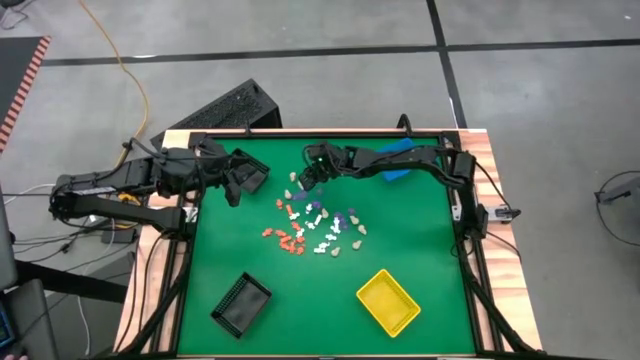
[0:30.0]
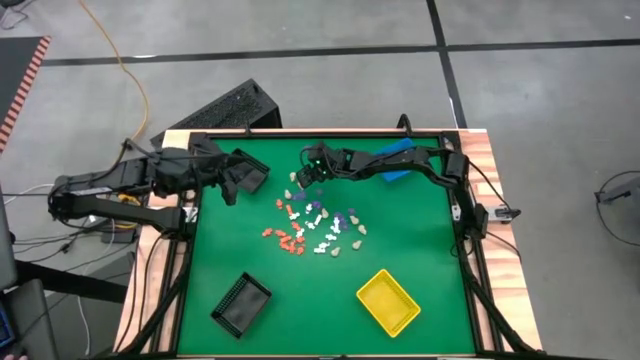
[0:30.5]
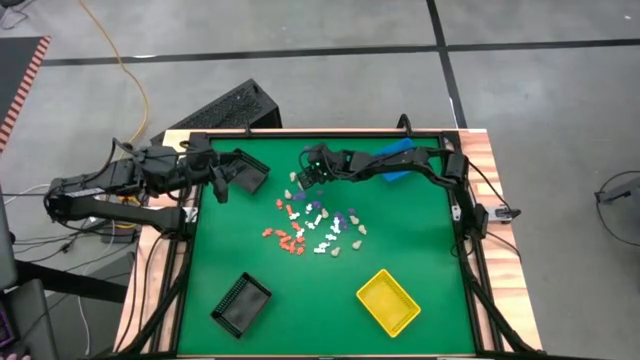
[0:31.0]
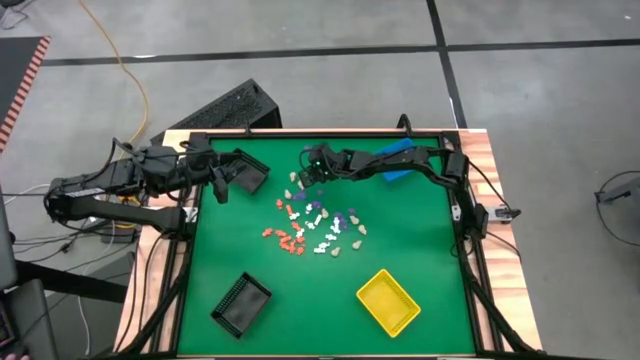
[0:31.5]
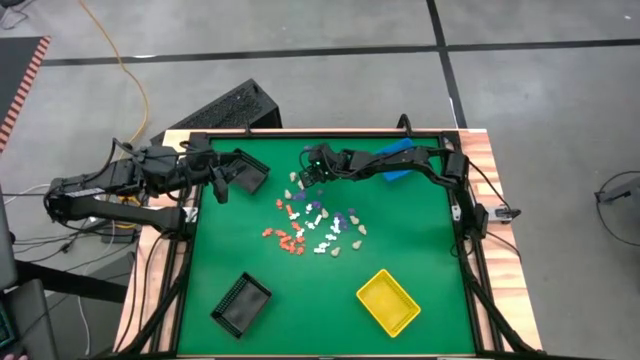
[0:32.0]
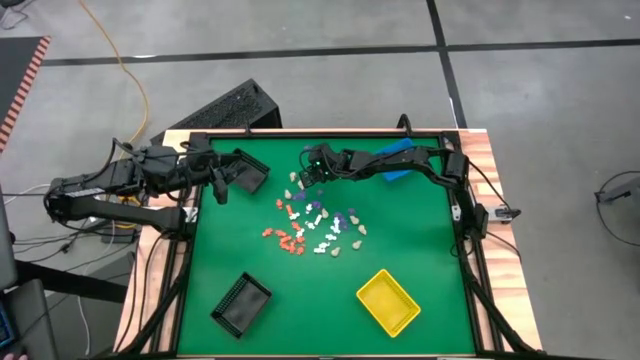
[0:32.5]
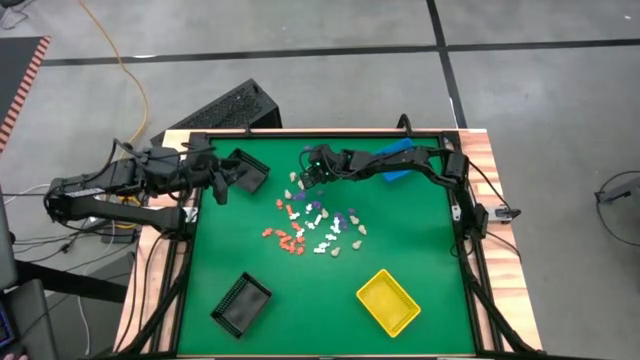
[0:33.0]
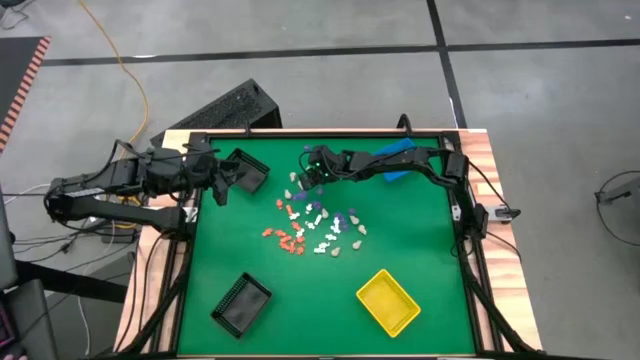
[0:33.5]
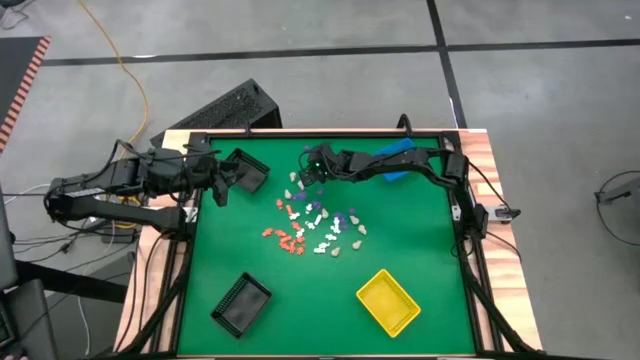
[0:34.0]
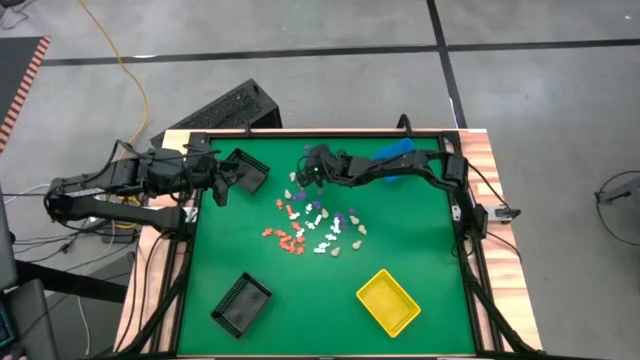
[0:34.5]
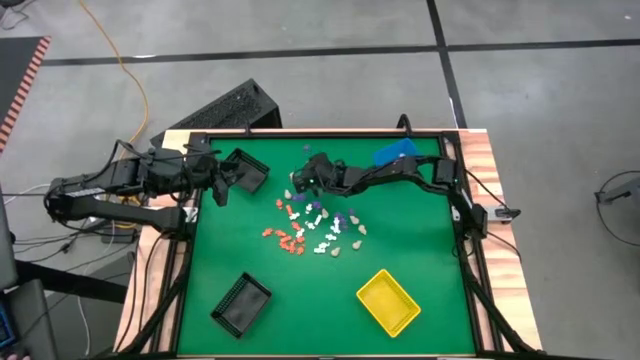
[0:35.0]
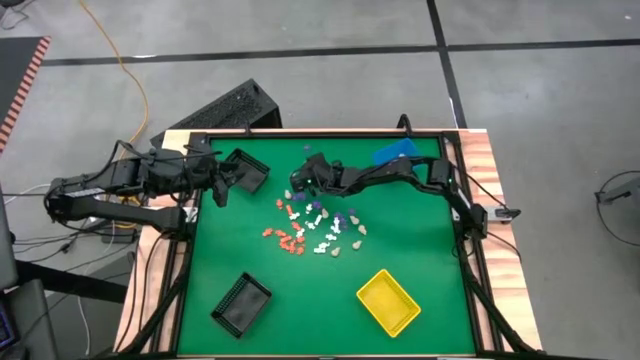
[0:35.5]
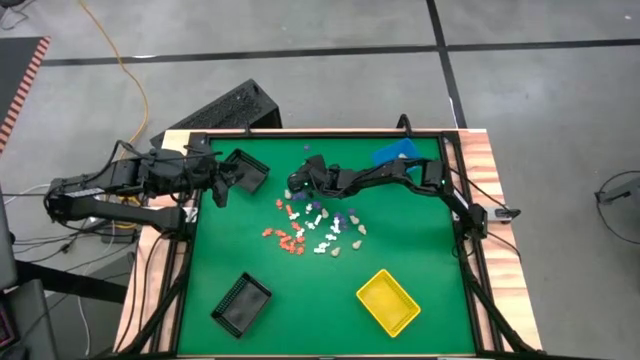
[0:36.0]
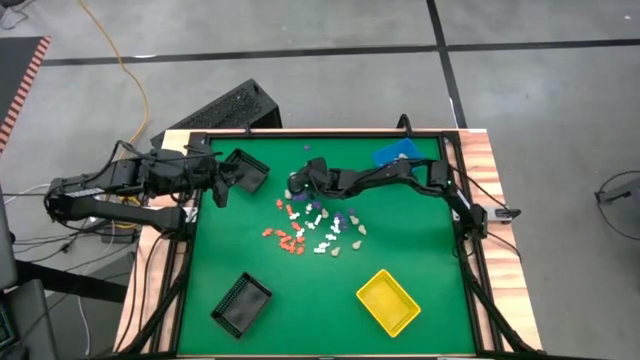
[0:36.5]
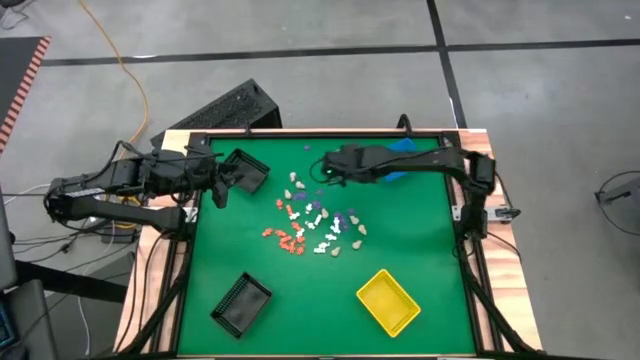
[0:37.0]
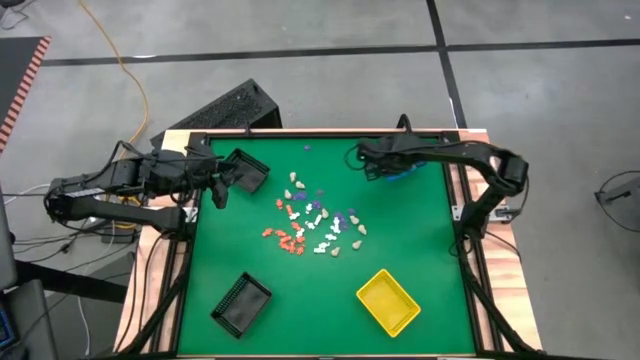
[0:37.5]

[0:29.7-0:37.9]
Task: Sort Halloween decoration
Put the skull toy into the blue basket

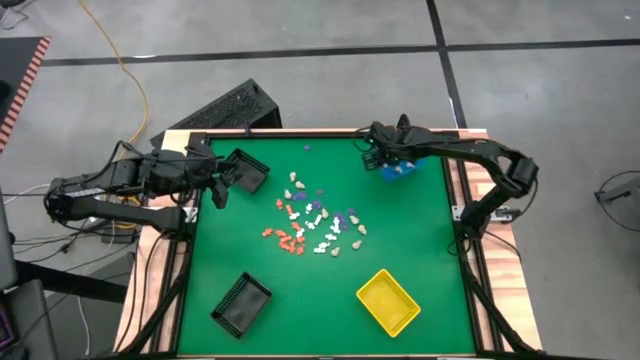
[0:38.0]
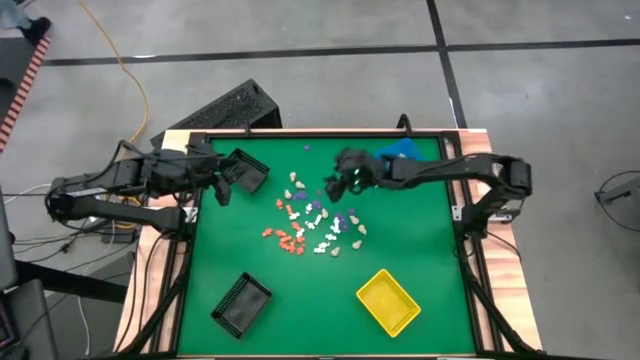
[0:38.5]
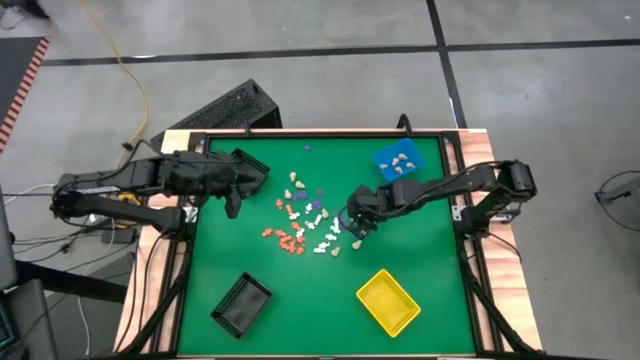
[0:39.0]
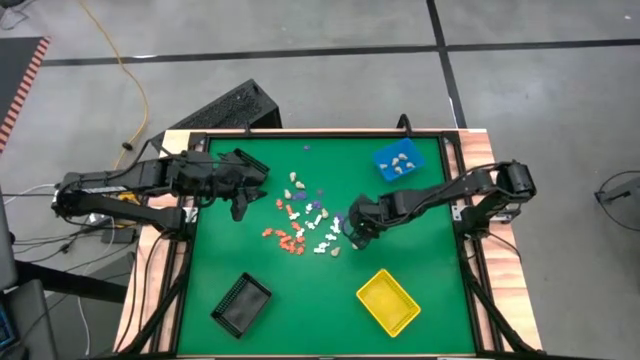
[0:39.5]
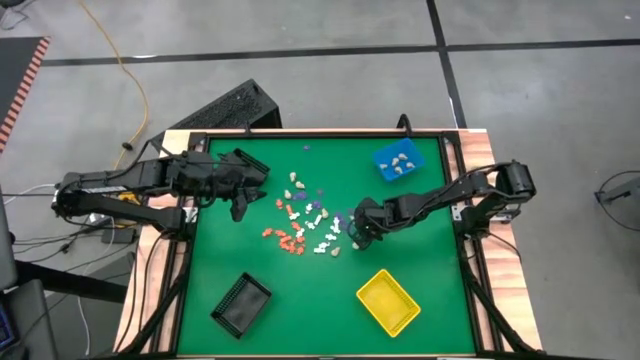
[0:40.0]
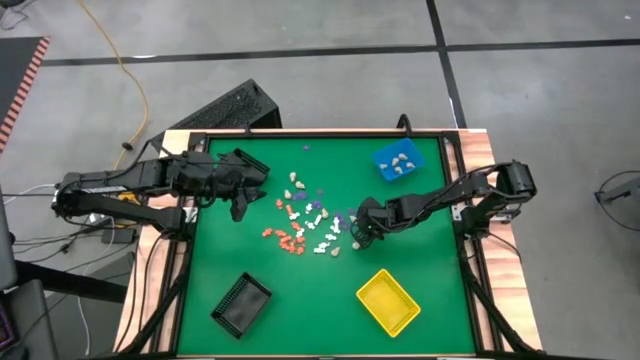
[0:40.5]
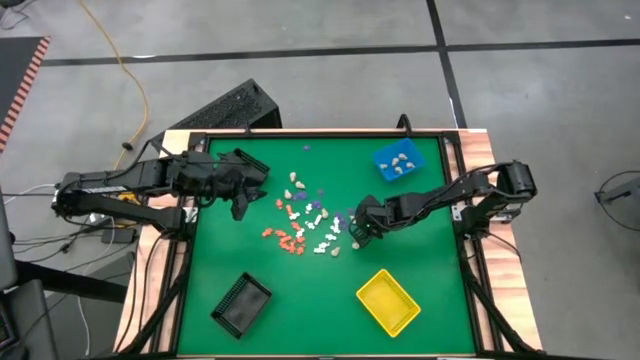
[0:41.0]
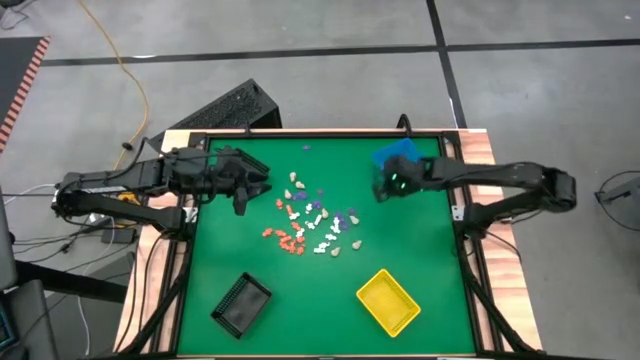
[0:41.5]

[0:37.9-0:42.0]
Put the skull toy into the blue basket

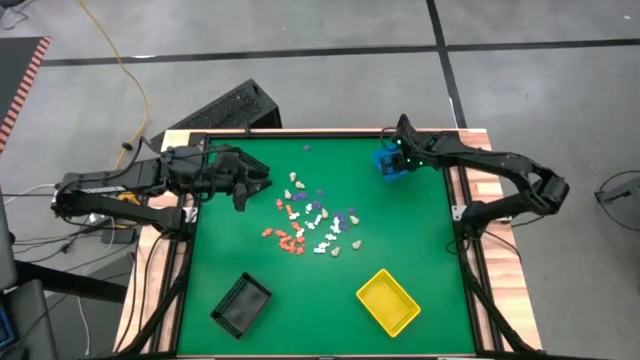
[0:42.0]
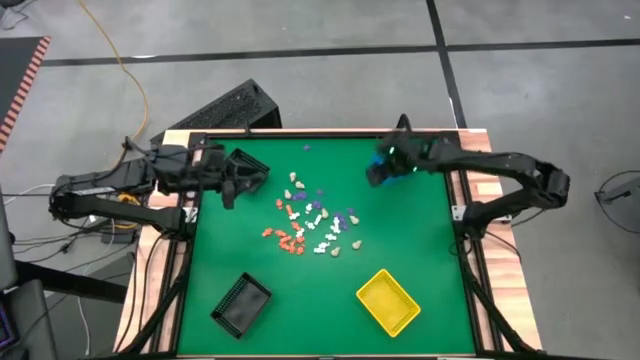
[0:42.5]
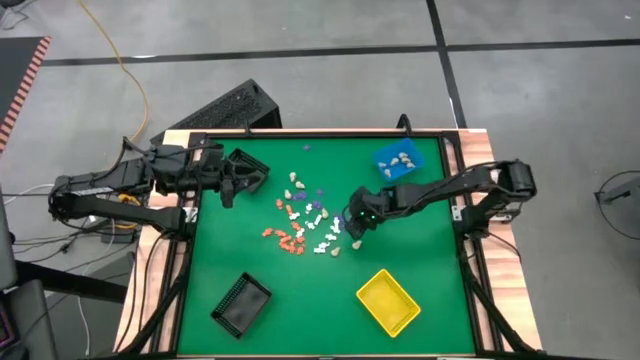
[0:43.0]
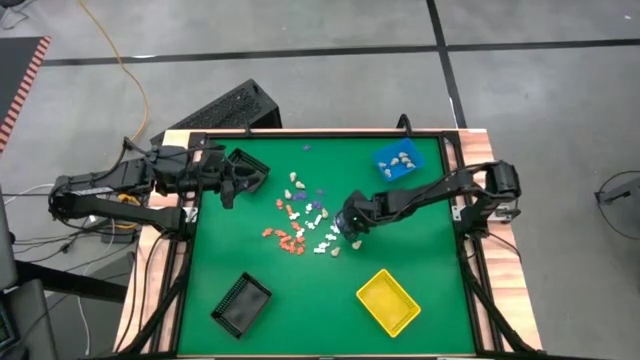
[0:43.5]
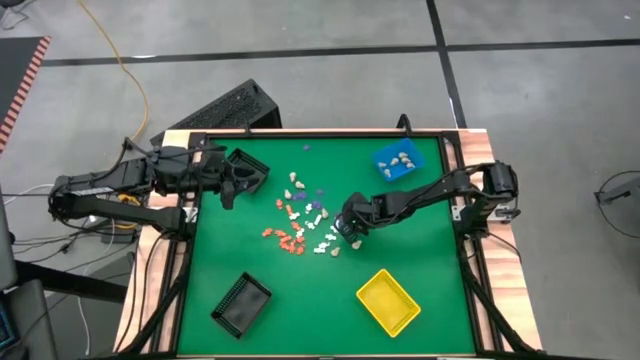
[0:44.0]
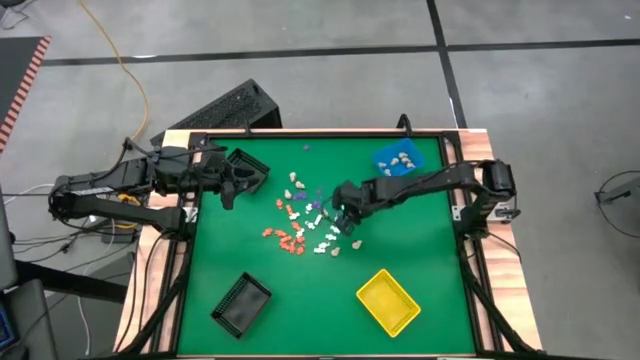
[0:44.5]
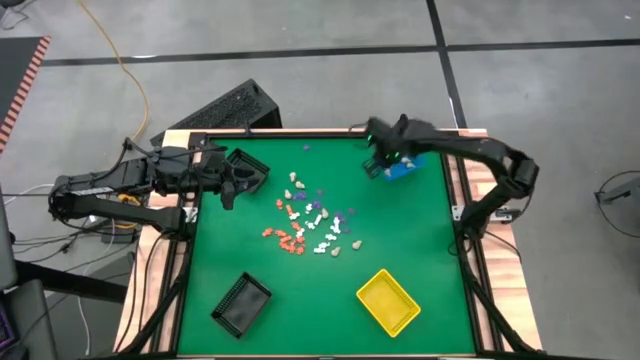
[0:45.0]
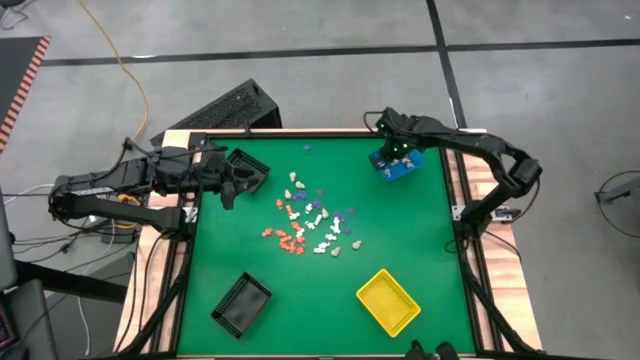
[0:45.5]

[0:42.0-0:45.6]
Put the skull toy into the blue basket

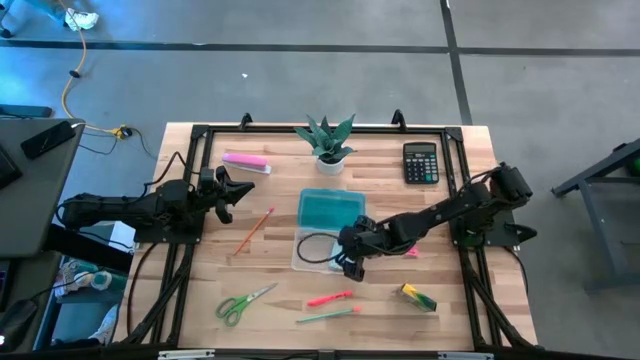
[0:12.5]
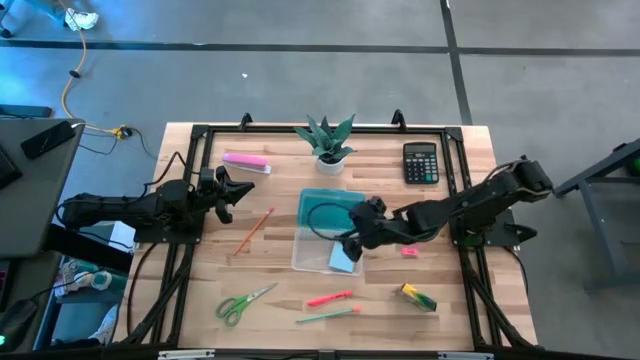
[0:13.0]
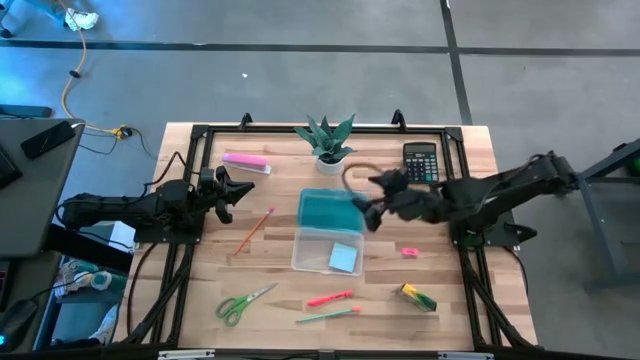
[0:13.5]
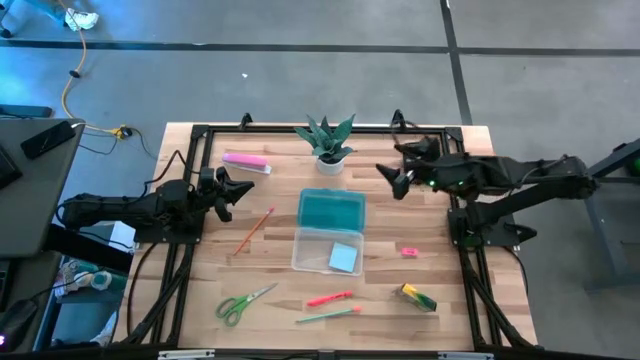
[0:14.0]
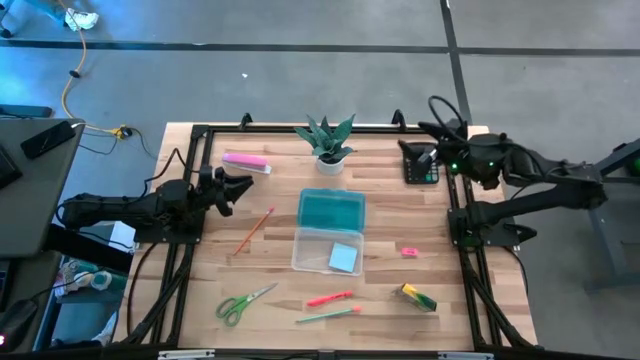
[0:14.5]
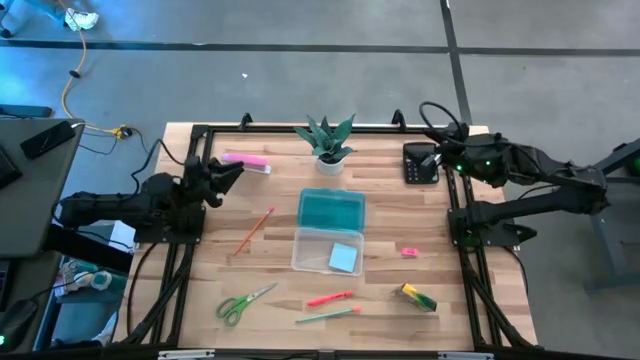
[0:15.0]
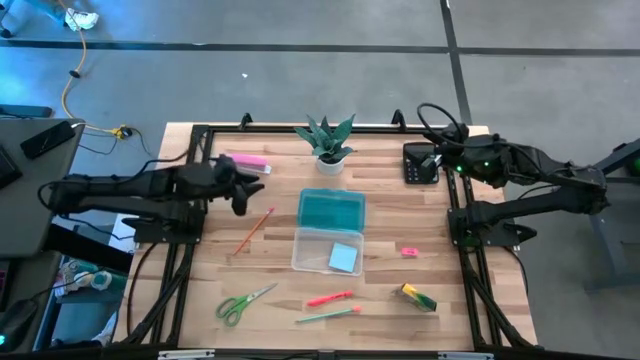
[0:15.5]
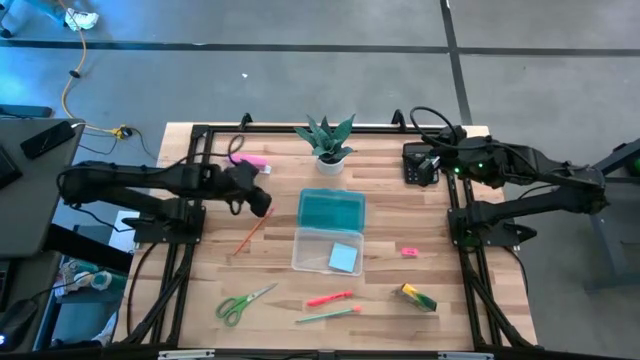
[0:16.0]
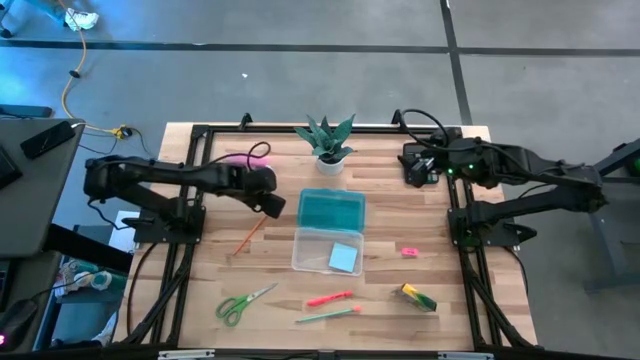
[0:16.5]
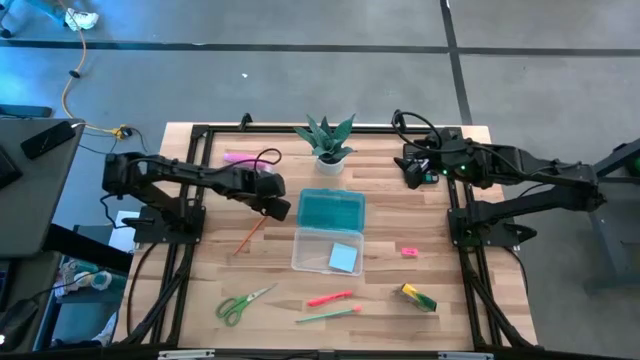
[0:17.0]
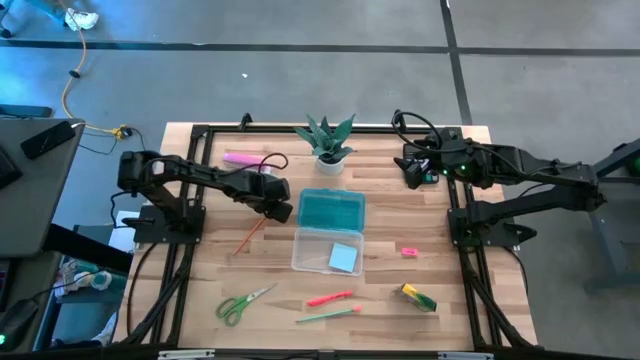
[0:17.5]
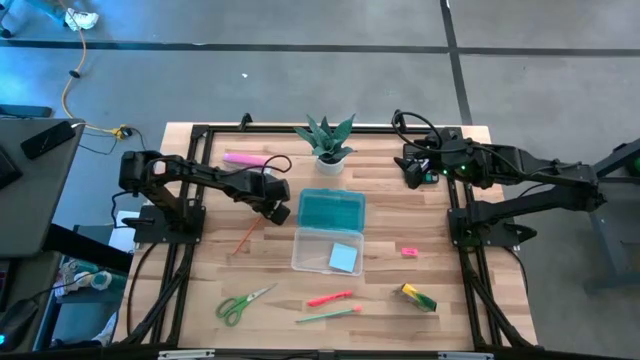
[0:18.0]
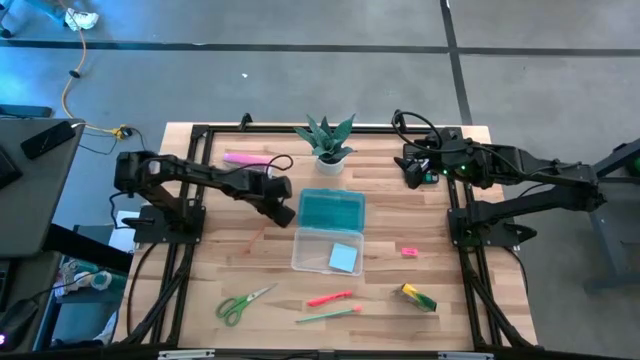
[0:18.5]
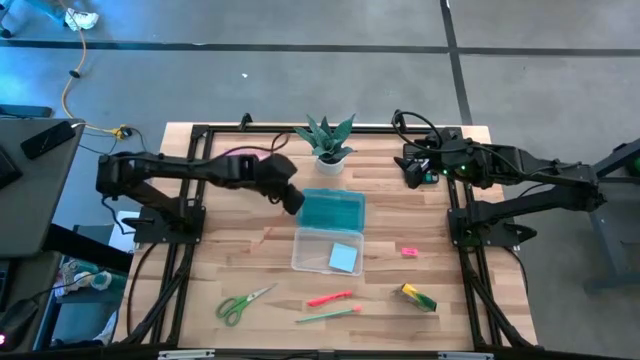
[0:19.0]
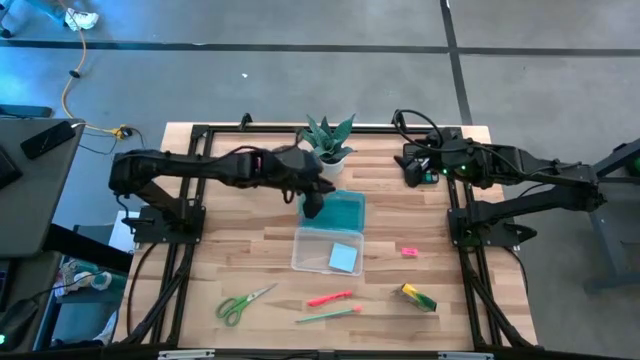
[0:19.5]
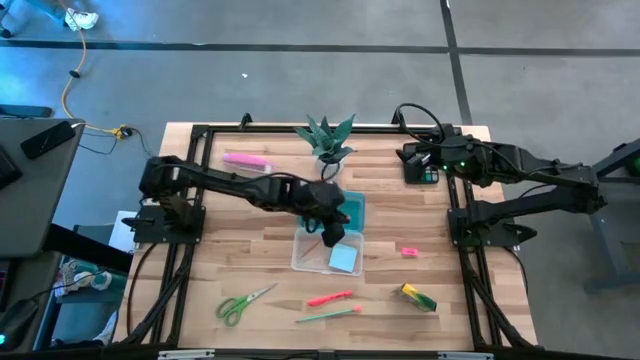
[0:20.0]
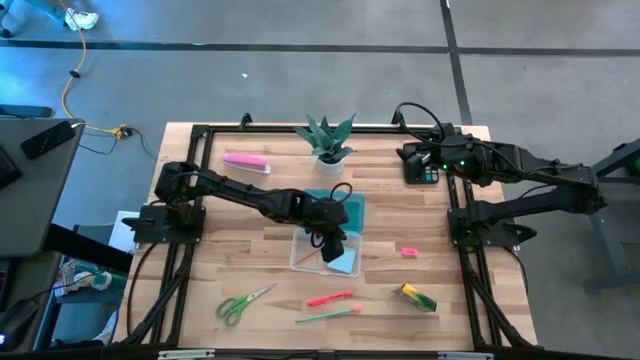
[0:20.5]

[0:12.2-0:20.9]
Task: Pack school essentials
Put the yellow pencil into the blue supply box
